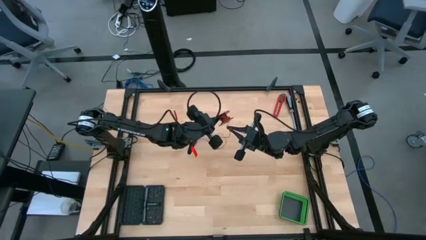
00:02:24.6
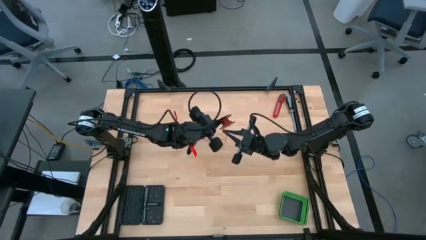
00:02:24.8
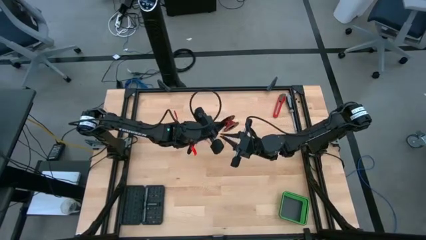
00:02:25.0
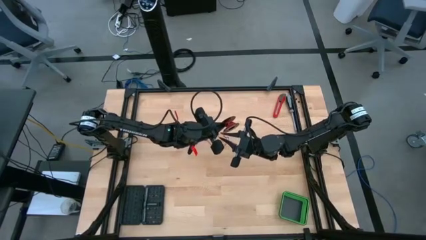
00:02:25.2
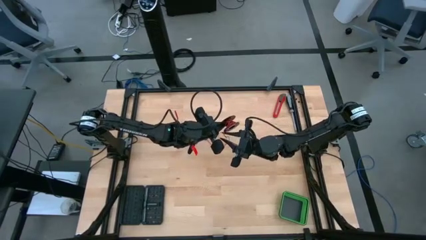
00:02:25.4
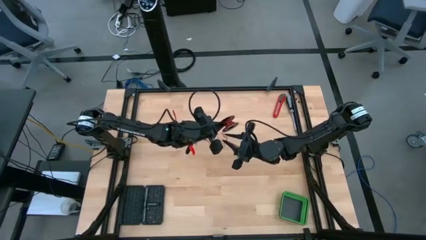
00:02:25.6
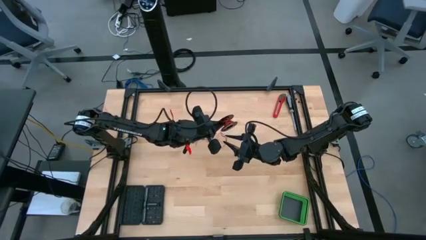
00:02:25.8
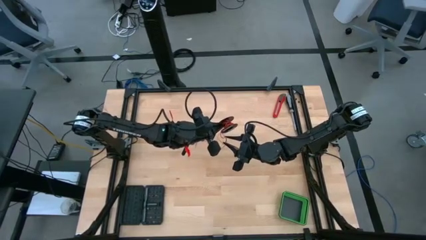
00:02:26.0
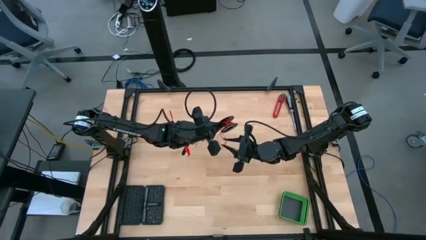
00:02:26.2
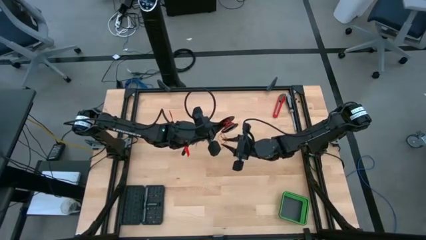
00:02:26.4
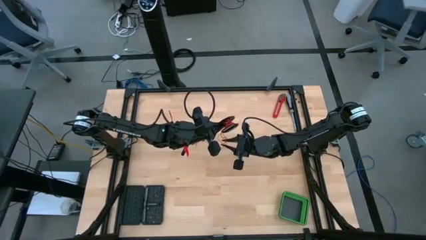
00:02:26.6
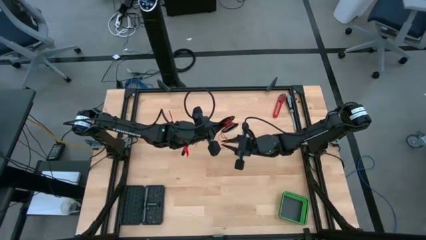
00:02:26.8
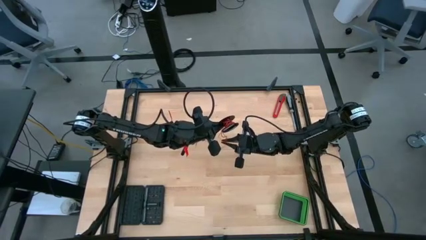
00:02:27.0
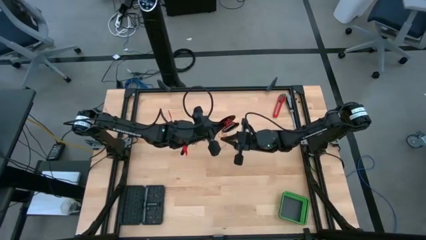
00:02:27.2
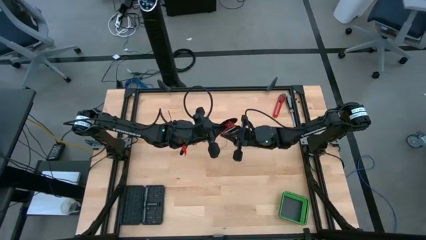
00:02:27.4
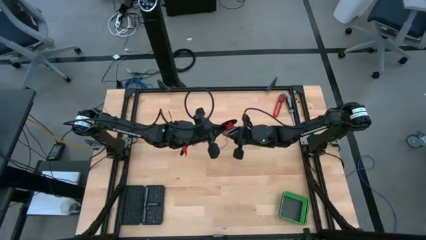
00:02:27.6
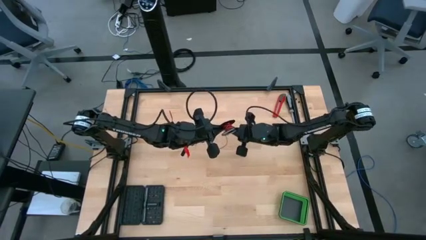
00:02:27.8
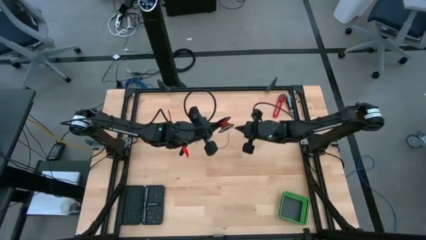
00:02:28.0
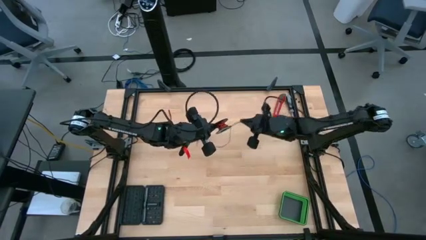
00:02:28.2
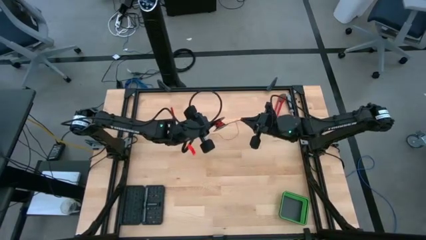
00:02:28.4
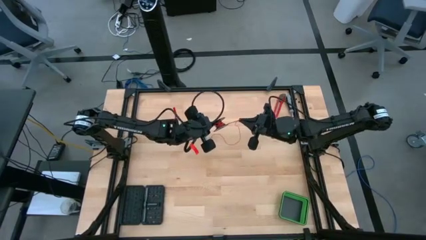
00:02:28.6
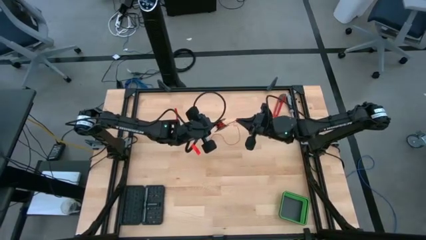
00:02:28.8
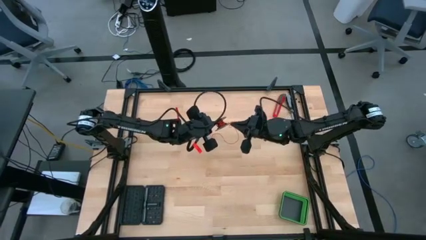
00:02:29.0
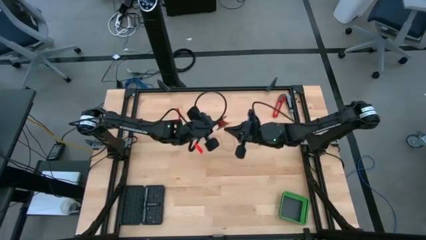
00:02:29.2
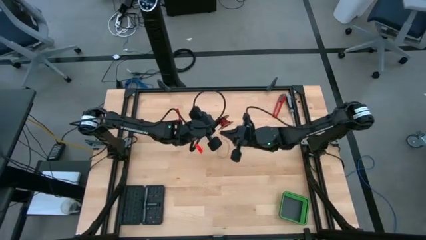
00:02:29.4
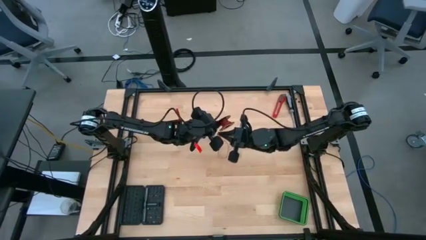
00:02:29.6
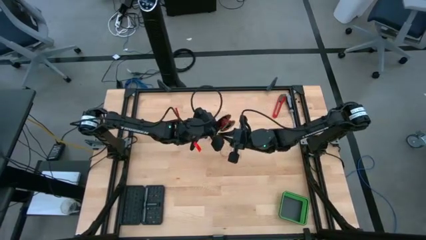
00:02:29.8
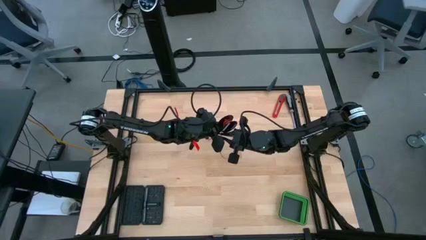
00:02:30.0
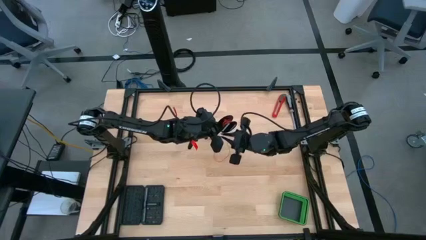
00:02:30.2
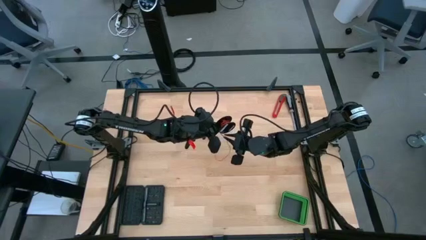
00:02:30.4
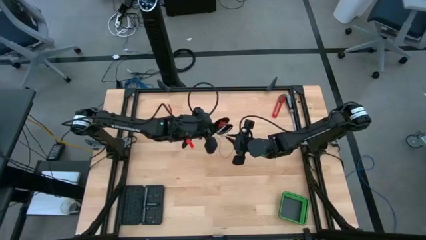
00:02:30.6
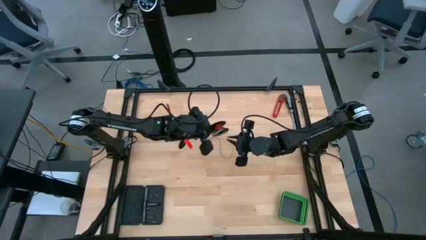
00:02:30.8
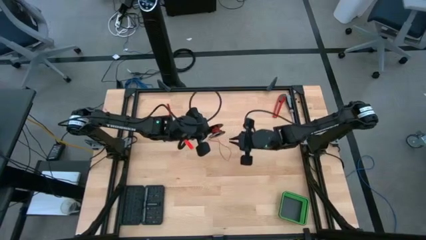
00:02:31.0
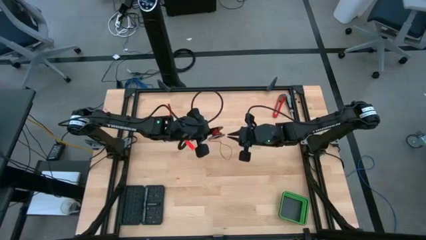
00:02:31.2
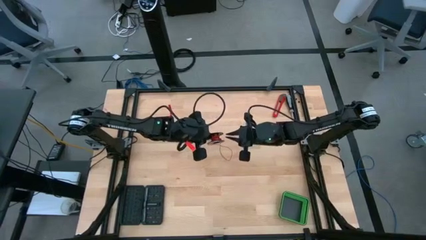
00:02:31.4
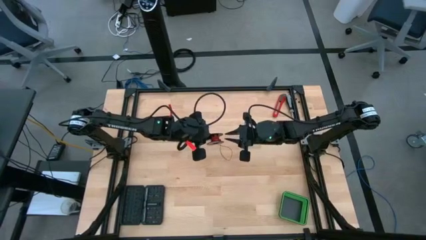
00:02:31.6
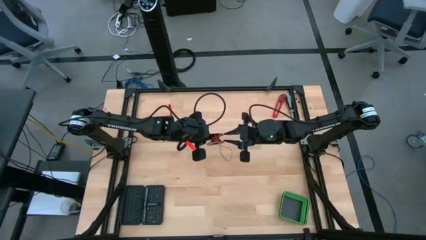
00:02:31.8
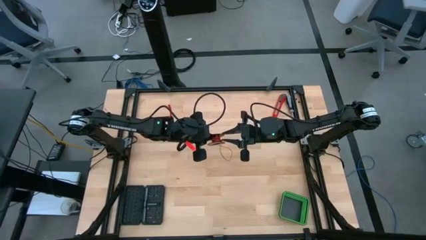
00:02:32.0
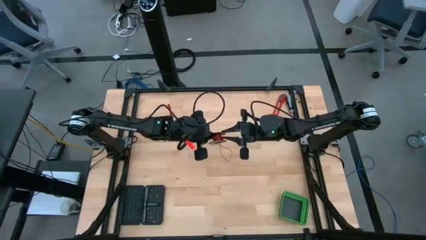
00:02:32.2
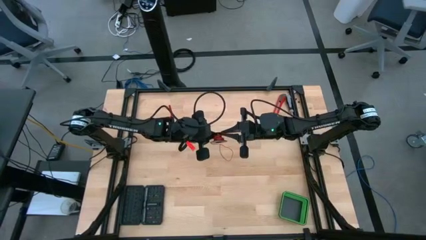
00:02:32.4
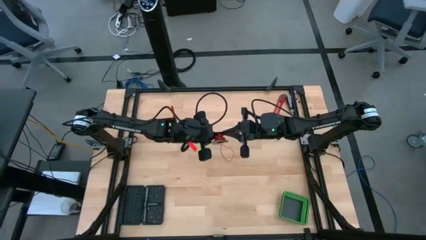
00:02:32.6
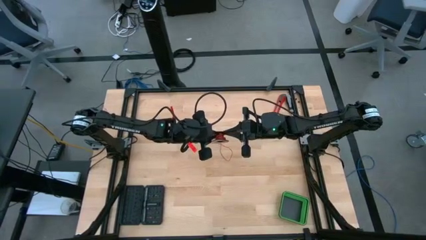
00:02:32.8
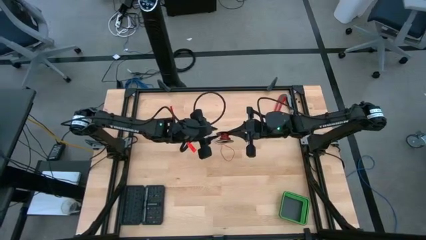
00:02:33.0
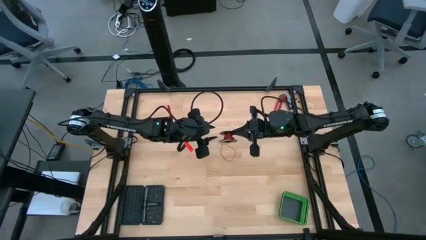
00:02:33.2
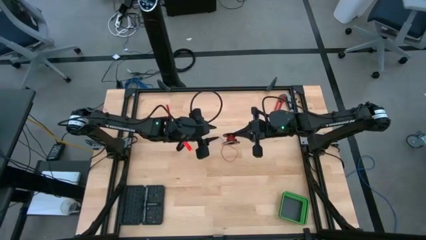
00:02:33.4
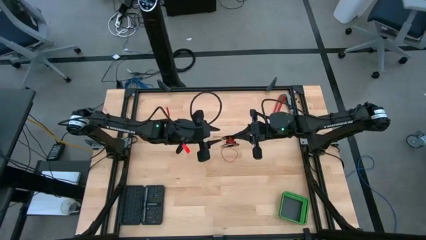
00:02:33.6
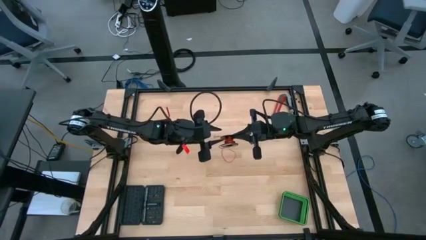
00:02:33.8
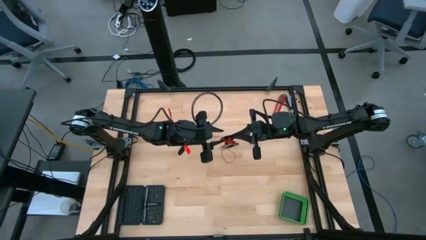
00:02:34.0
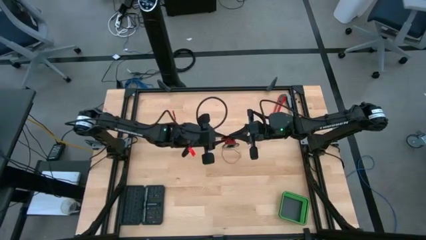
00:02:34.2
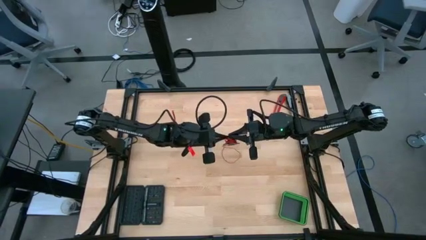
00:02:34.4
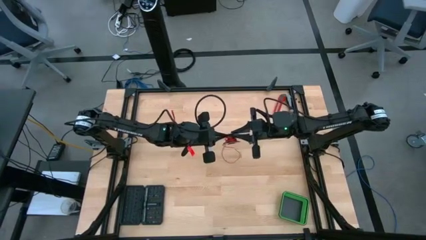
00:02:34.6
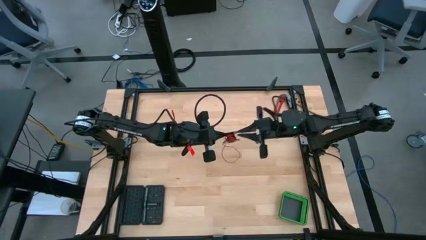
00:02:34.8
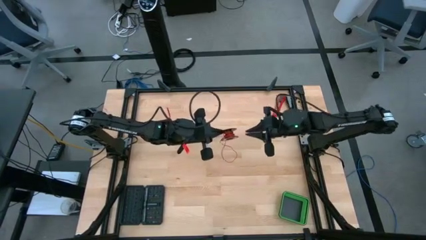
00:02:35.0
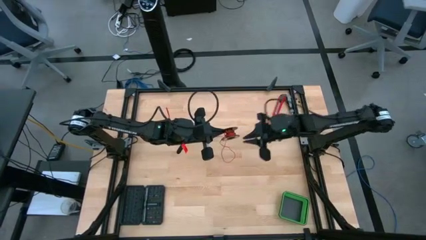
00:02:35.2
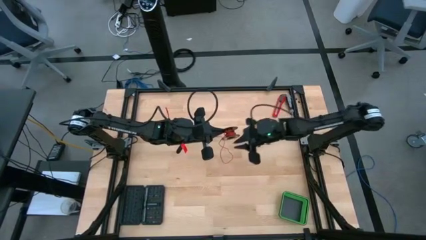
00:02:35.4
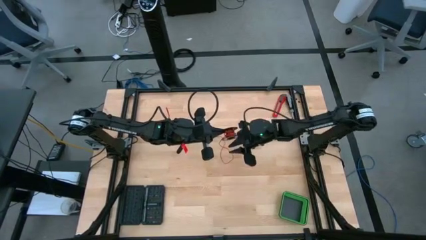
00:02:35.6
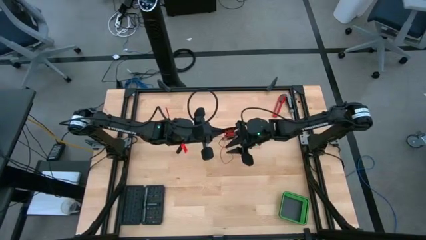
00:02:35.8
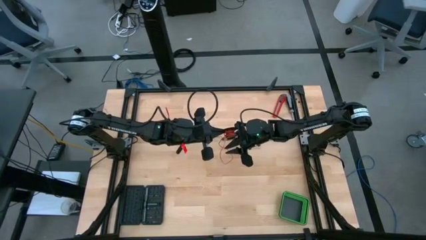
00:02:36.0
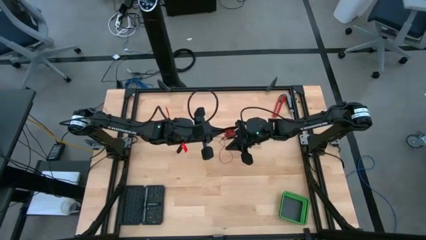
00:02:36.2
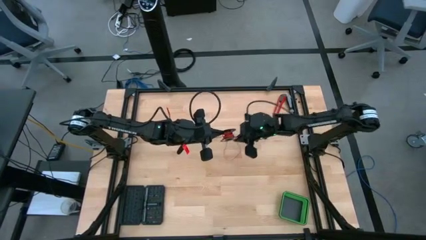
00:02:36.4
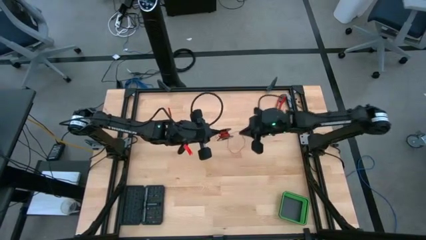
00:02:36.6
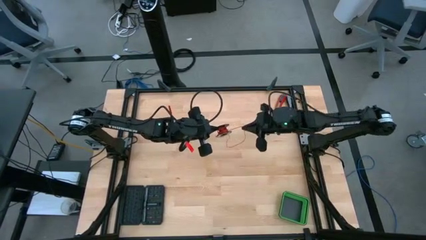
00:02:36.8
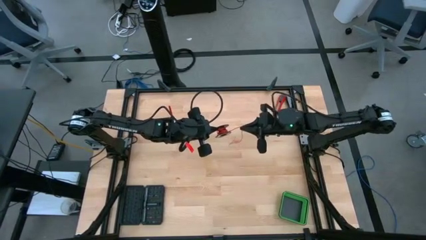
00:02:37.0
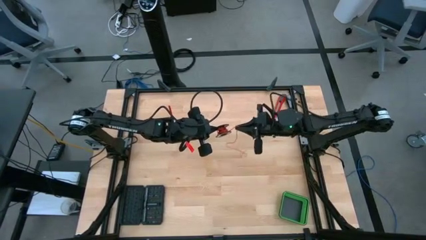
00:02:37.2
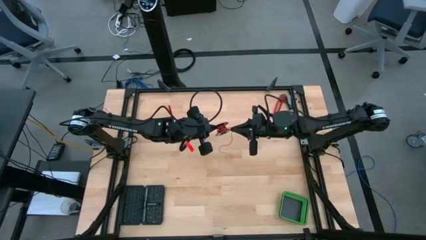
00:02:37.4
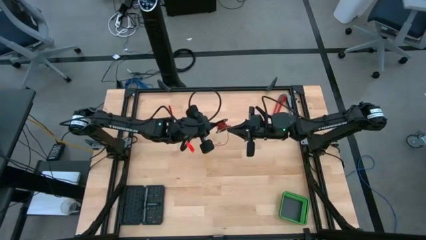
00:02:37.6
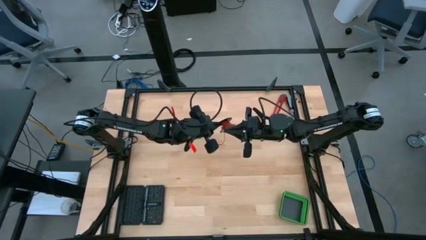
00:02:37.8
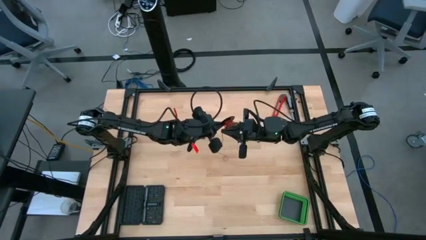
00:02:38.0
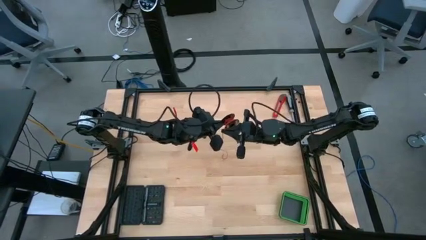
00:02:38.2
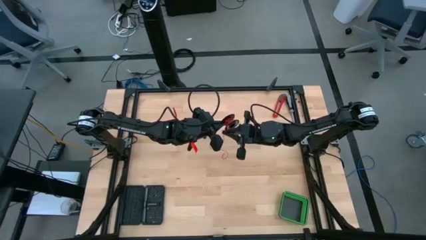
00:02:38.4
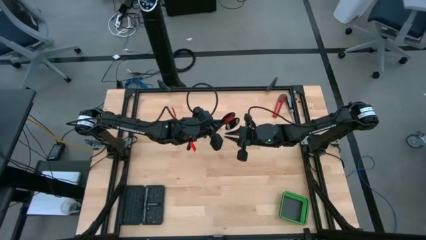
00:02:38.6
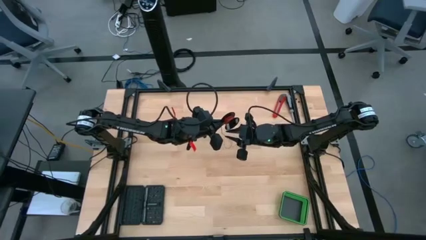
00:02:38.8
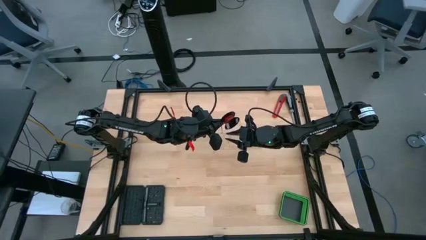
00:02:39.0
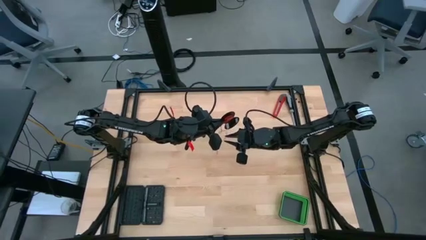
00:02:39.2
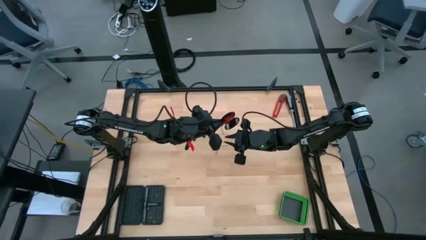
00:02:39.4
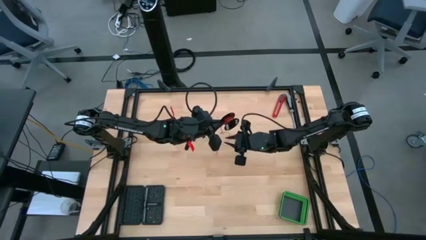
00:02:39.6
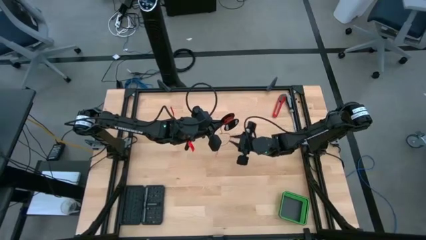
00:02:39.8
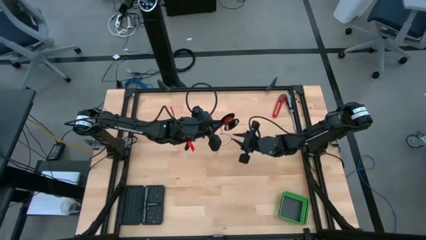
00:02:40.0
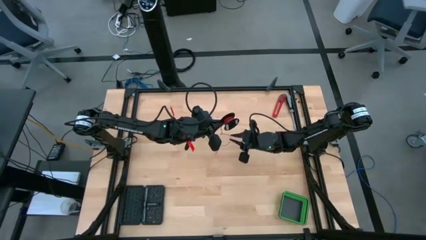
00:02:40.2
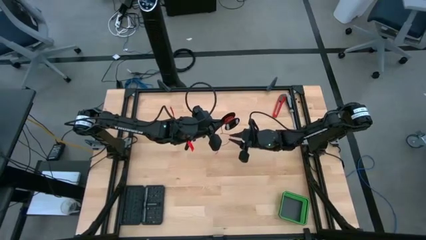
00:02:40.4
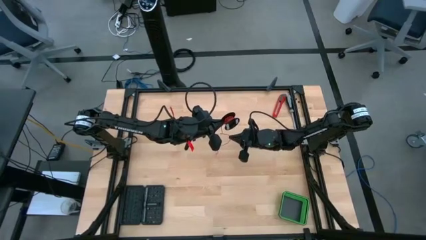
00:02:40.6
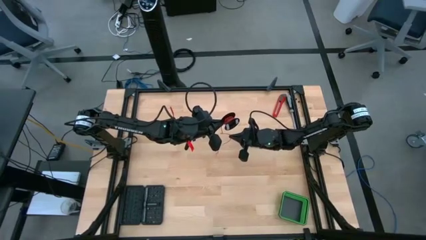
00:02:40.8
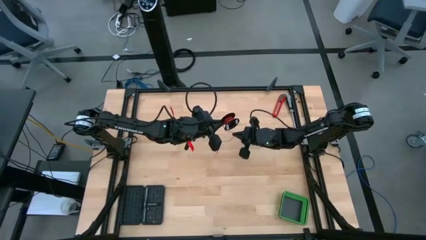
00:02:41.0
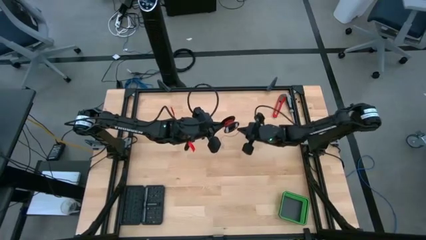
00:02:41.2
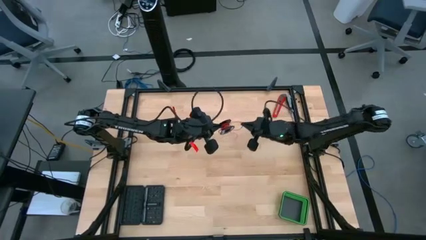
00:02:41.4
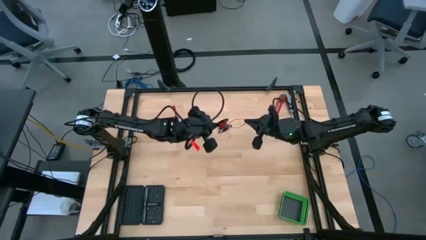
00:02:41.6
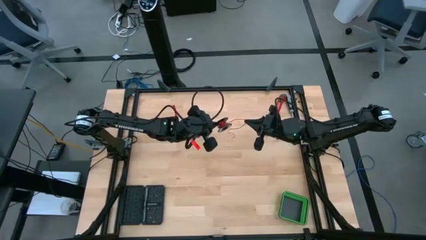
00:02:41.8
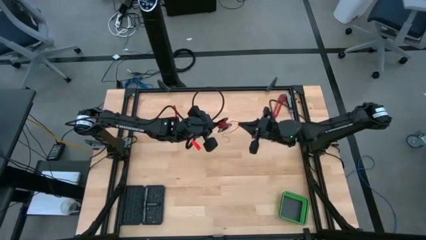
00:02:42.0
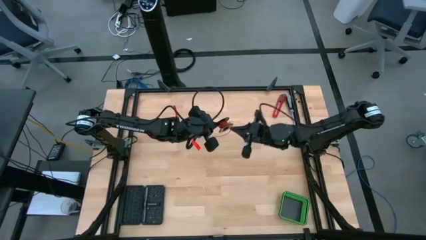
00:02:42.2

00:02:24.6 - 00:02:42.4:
Task: Coil cords
Coil the red wire onto the black spool
